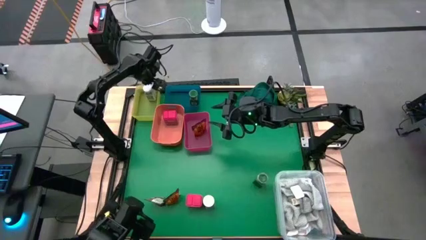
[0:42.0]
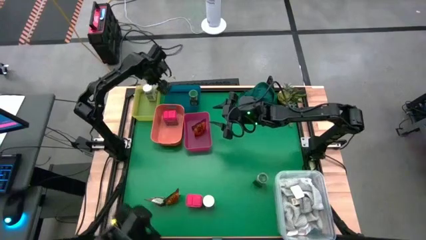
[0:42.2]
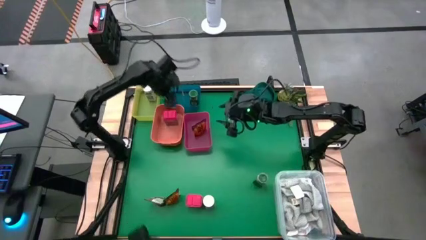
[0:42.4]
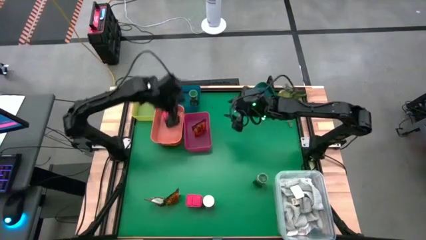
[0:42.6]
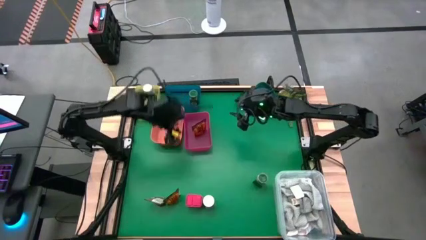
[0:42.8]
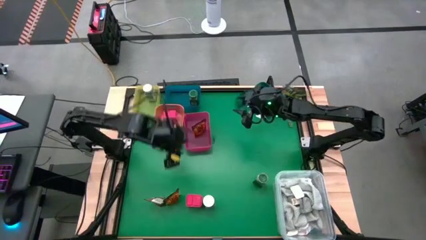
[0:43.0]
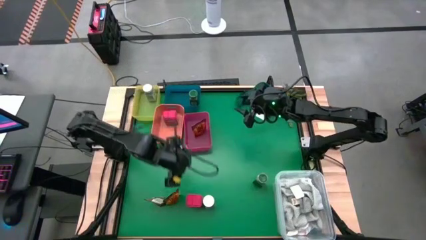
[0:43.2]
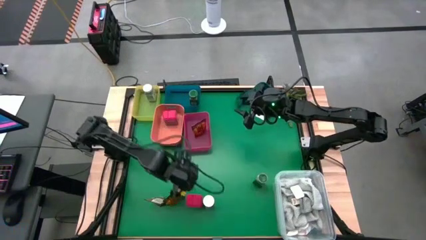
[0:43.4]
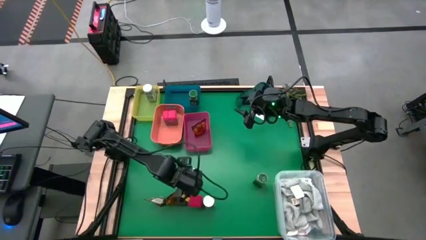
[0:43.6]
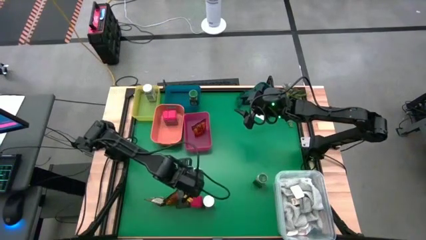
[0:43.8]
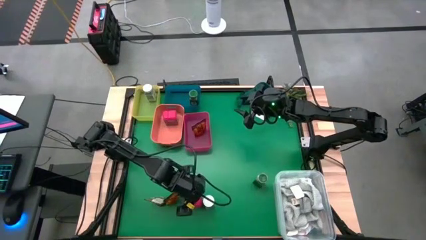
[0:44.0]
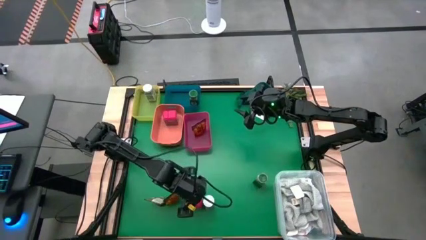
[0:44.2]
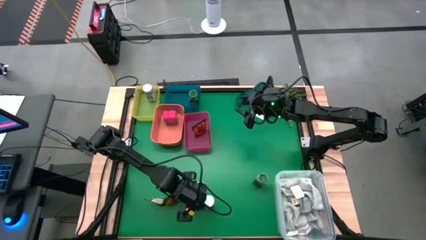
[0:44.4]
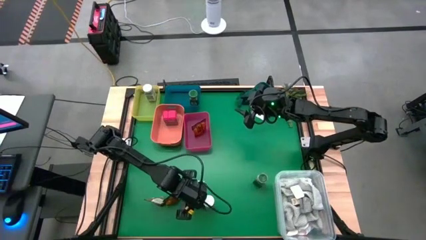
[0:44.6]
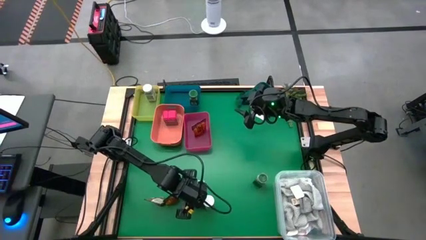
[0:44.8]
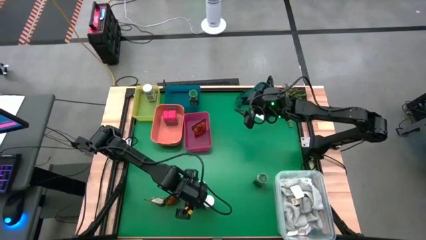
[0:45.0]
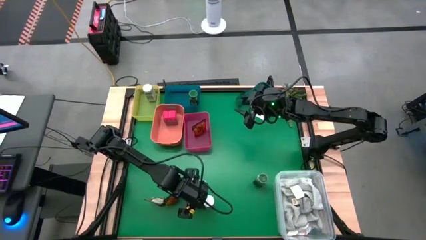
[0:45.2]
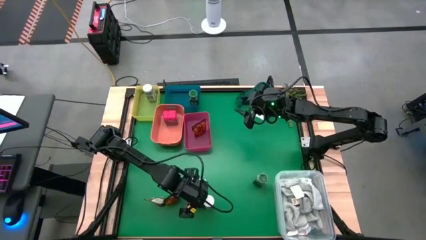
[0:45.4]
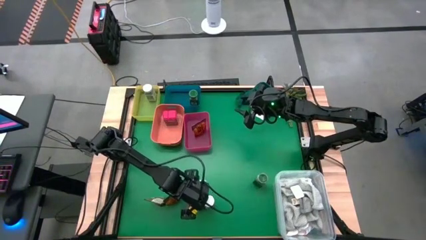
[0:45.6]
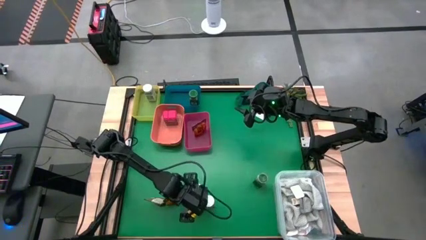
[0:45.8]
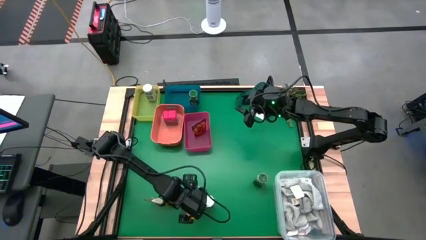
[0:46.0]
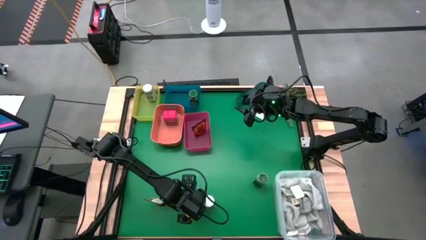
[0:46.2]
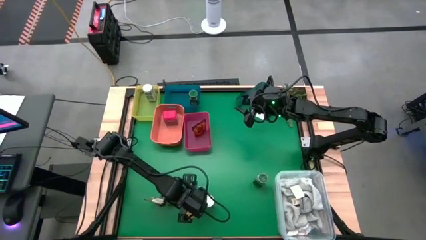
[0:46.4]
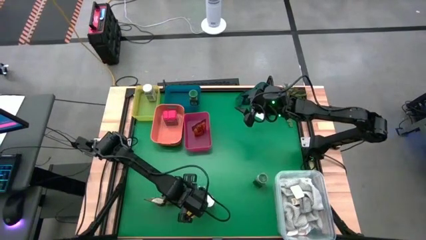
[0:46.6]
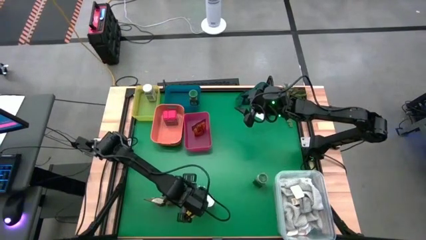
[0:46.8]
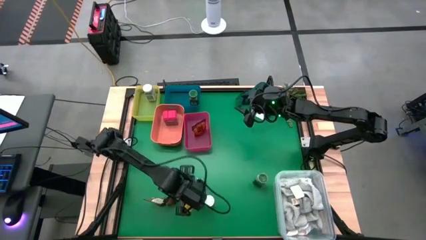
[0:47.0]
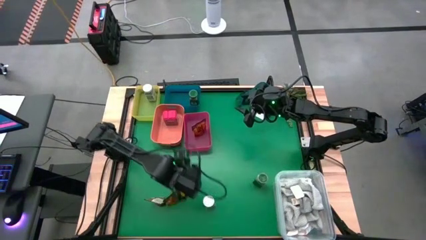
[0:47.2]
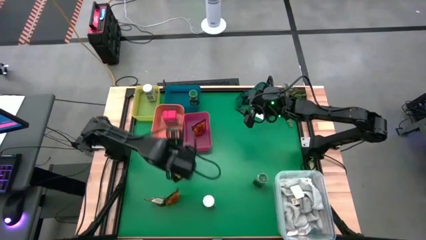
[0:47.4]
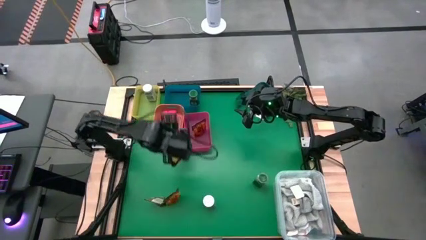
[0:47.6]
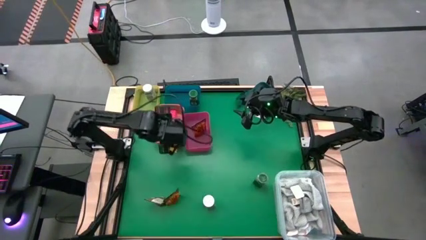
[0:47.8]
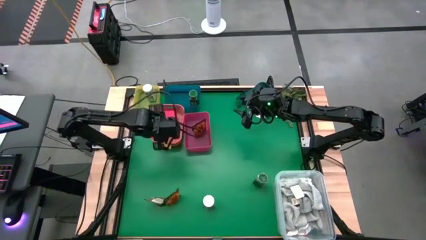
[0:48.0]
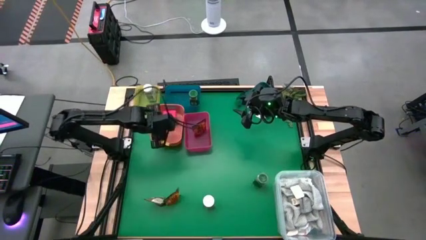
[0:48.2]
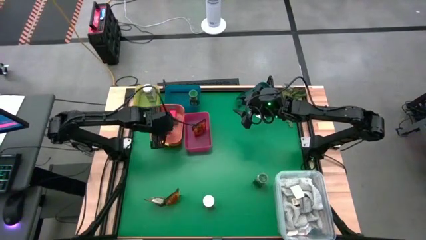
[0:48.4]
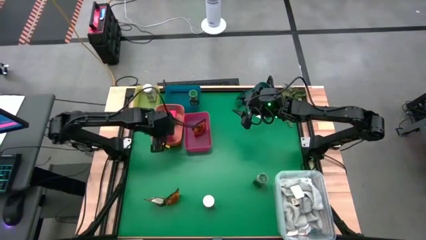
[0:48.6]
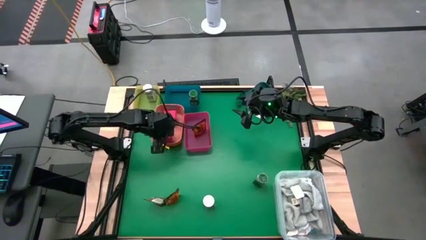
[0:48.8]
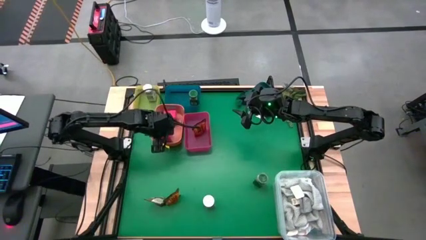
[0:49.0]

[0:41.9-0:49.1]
Task: Sort spices by type
Put the red seasoning can into the orange bin

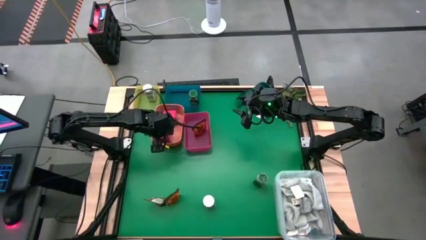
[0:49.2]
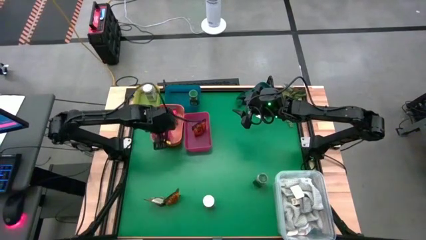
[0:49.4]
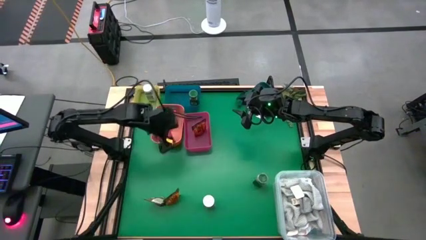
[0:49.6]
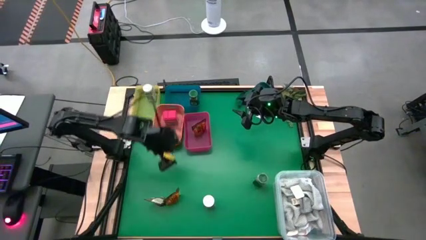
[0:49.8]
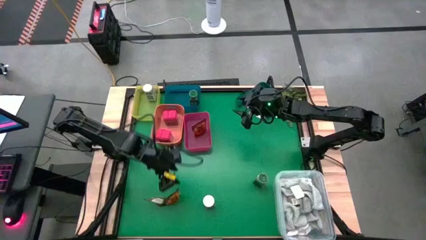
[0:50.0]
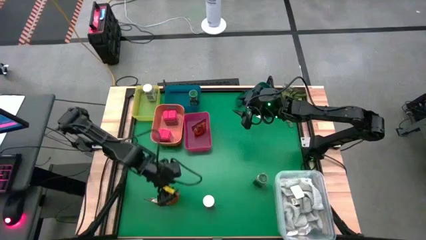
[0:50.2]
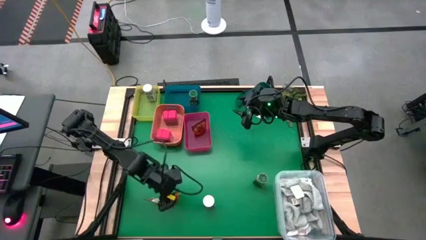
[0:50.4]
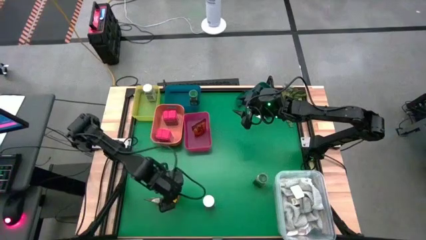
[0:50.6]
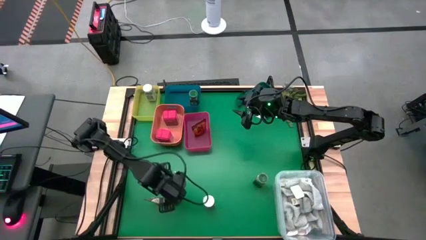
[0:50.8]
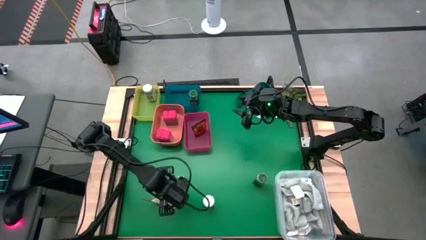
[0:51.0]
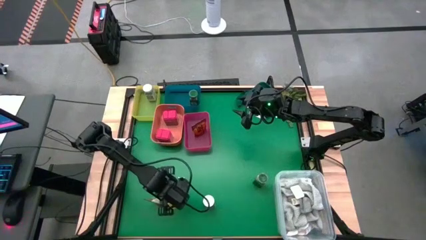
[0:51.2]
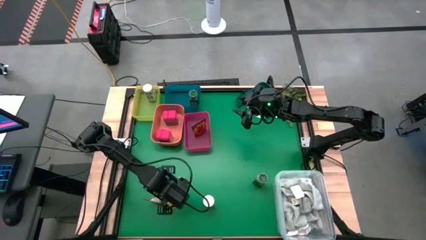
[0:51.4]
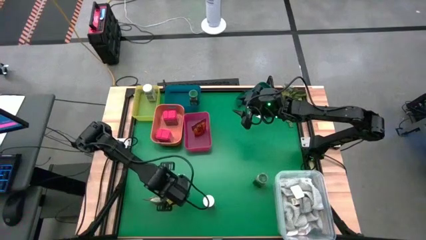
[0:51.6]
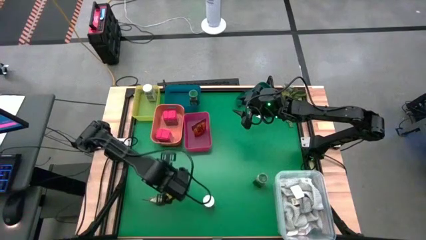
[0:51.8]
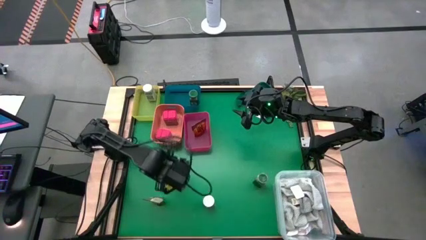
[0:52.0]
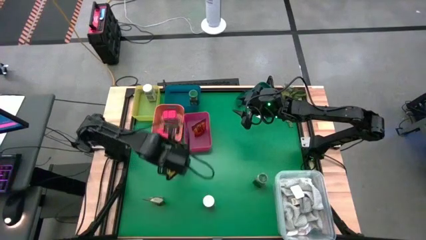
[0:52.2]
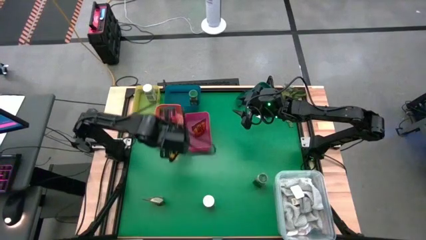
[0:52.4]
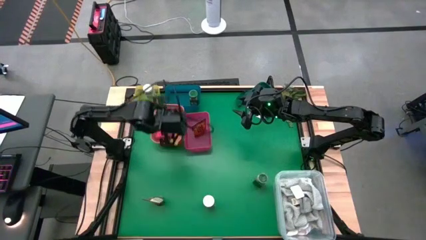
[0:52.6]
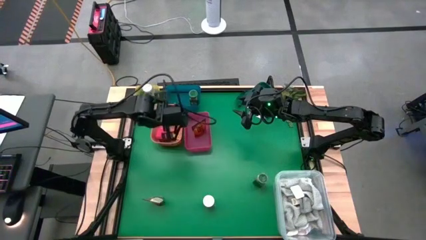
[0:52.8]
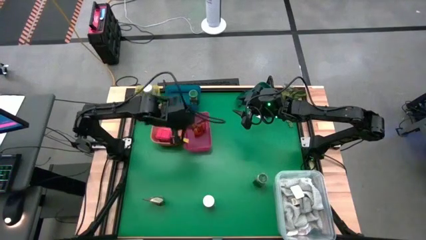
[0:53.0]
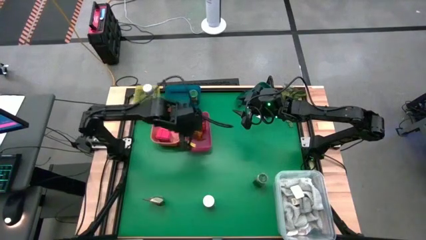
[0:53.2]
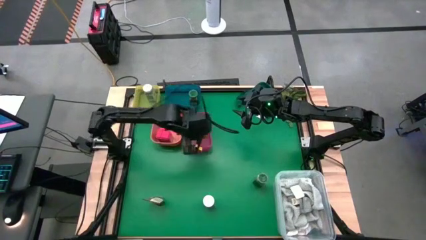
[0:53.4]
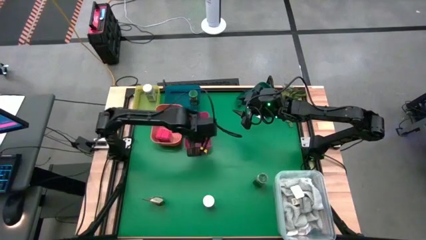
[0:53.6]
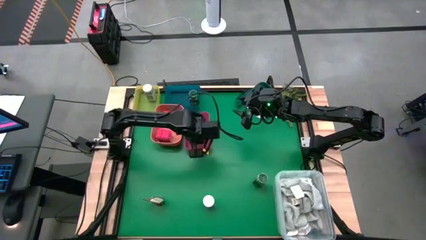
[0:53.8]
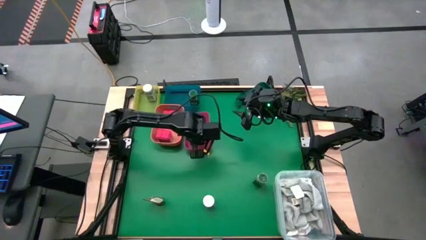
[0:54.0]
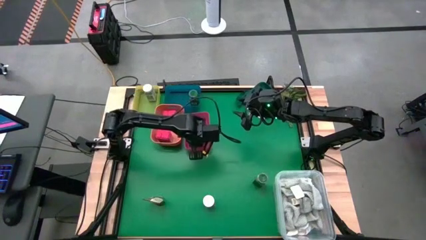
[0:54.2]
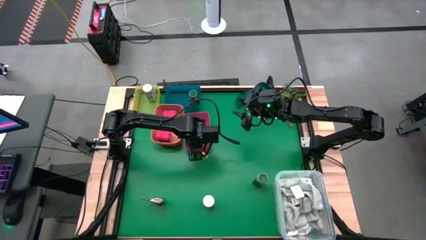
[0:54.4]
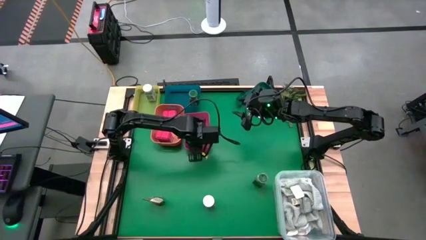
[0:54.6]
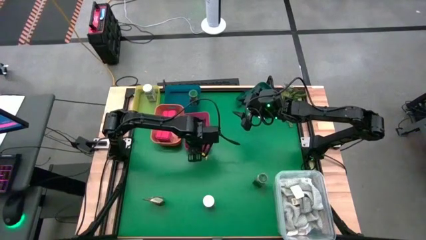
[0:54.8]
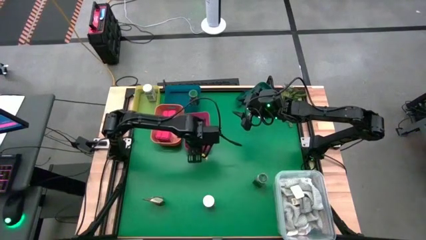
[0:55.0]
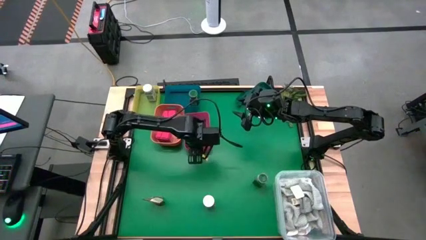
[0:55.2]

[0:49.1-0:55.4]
Put the right orange seasoning pack into the red bin

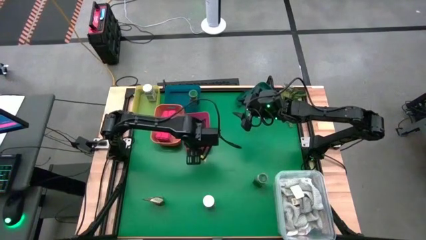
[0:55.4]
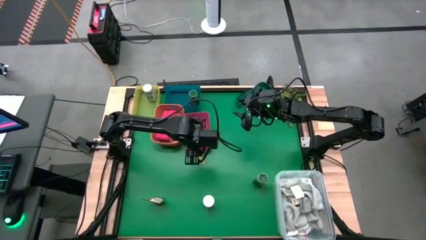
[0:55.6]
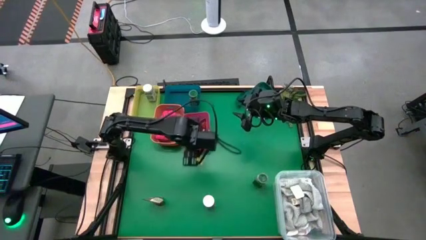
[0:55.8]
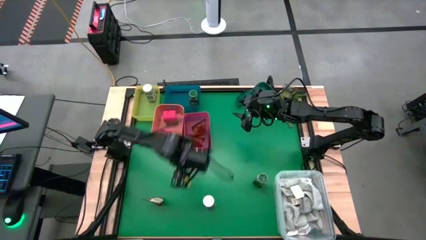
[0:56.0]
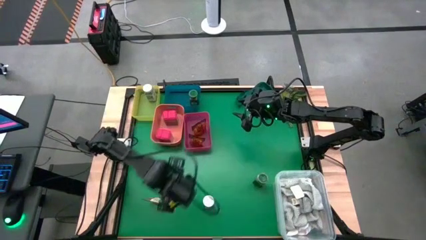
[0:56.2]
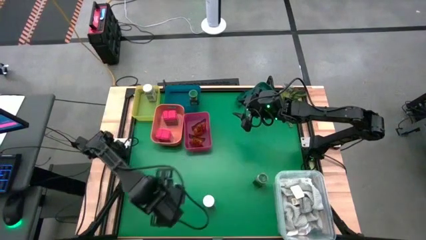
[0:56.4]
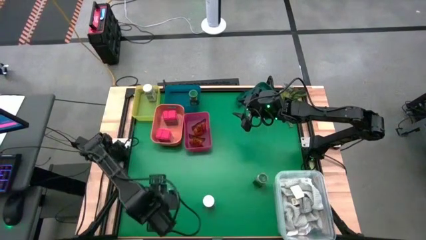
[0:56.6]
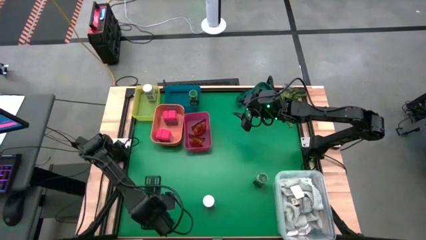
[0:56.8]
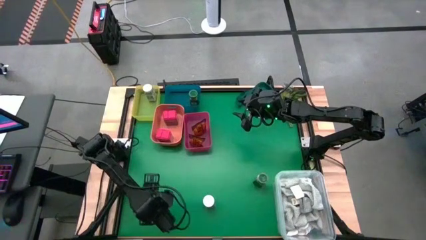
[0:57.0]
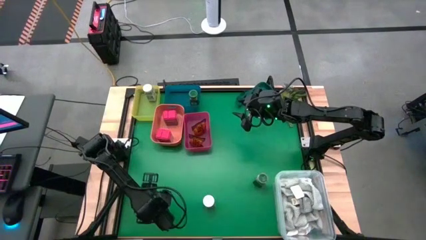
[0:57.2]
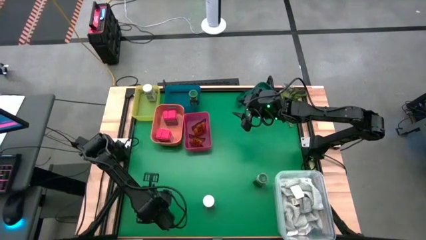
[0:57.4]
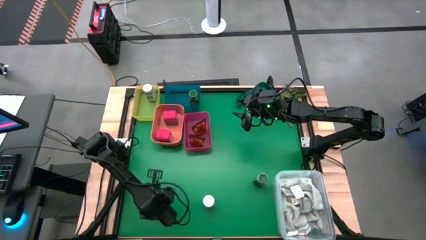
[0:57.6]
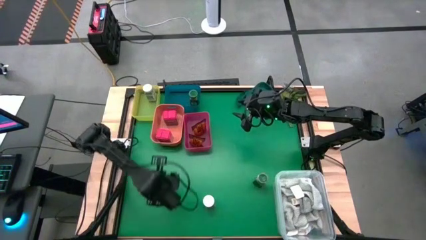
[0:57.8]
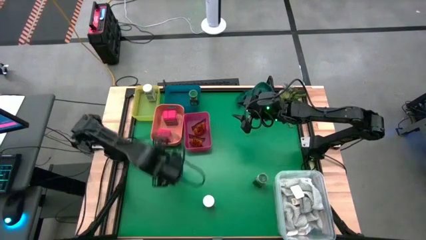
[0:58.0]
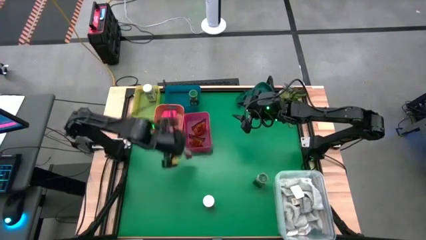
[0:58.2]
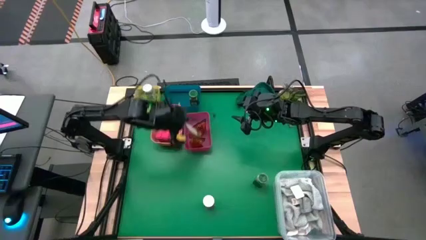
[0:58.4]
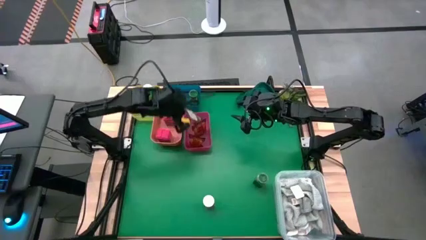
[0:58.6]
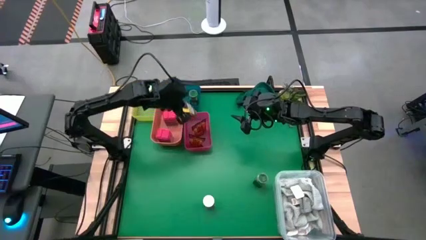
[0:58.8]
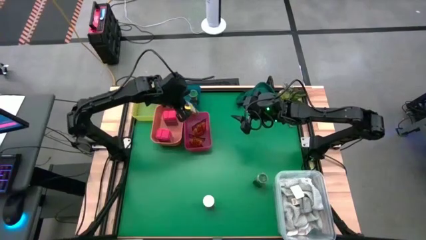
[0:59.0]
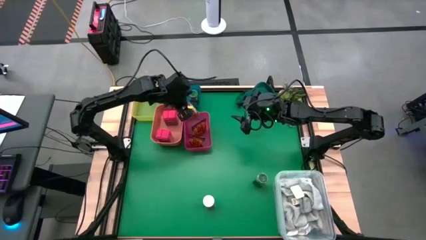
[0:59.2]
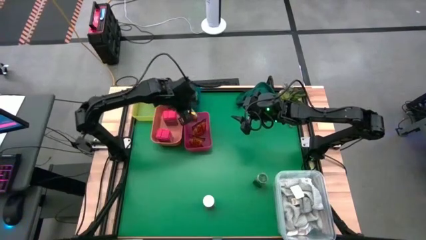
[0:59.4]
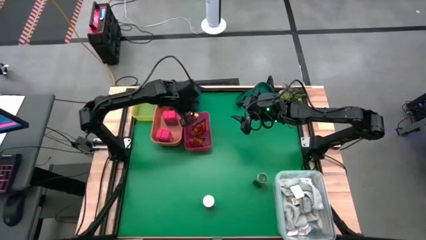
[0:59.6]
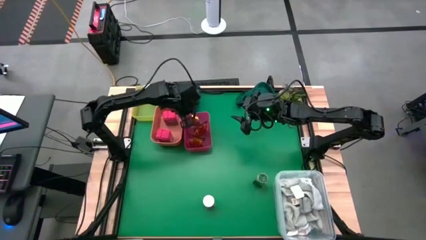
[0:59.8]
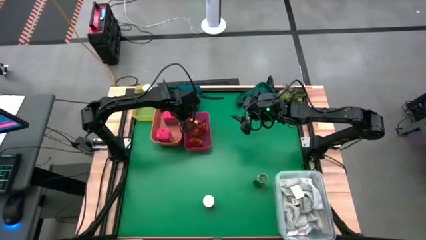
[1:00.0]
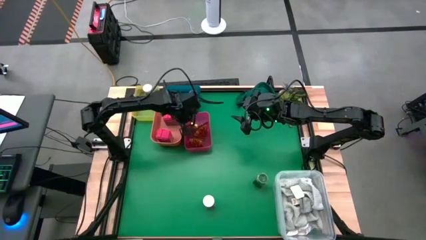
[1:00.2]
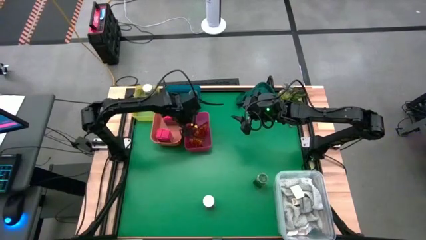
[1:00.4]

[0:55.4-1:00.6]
Put the orange seasoning pack into the red bin
